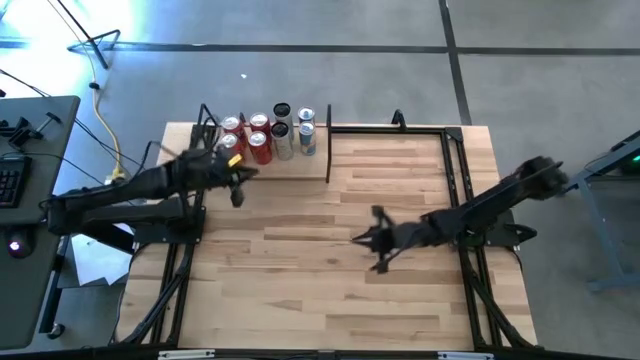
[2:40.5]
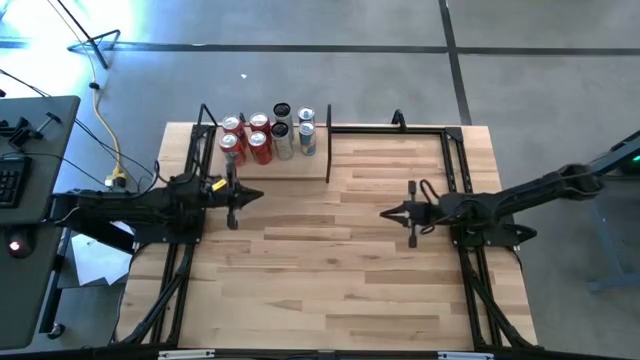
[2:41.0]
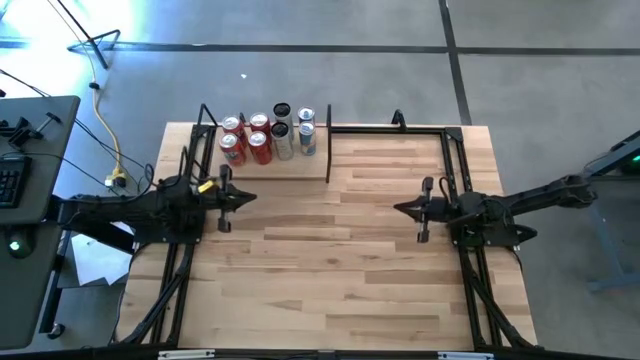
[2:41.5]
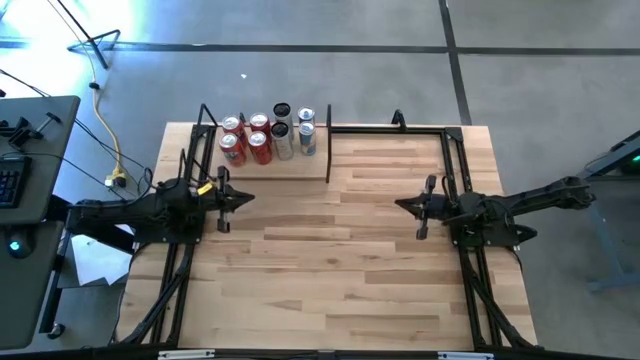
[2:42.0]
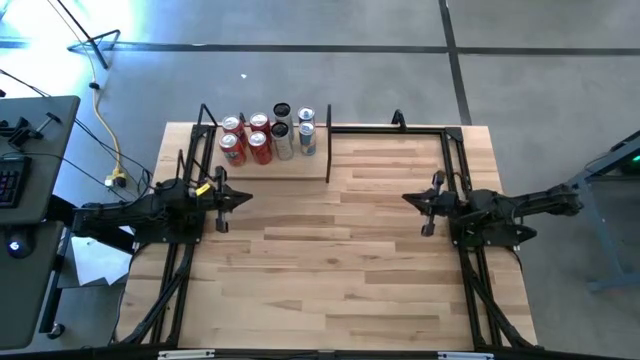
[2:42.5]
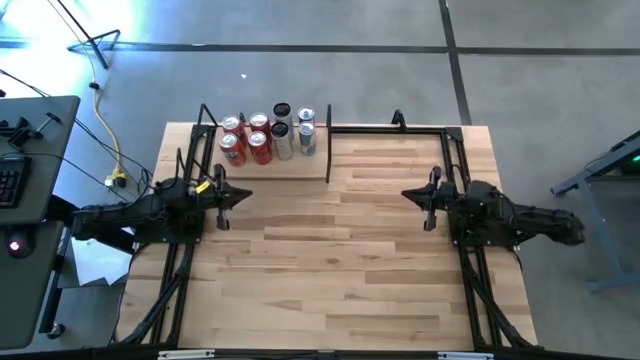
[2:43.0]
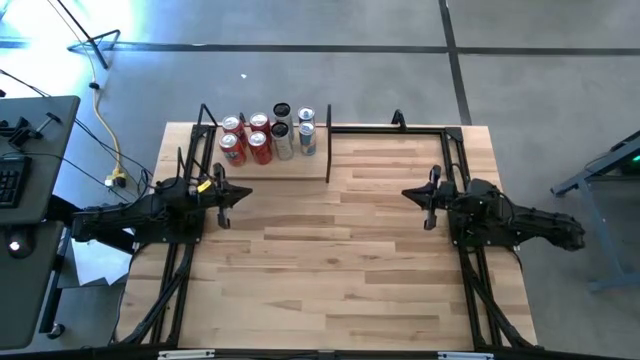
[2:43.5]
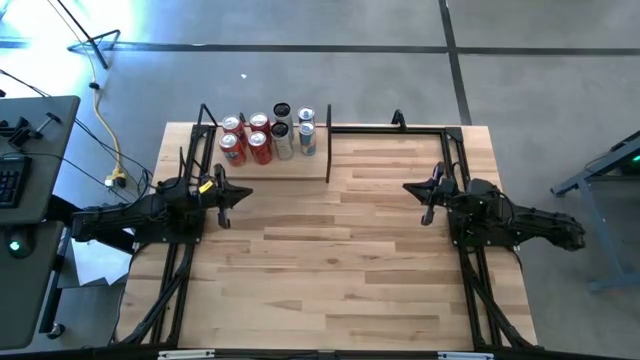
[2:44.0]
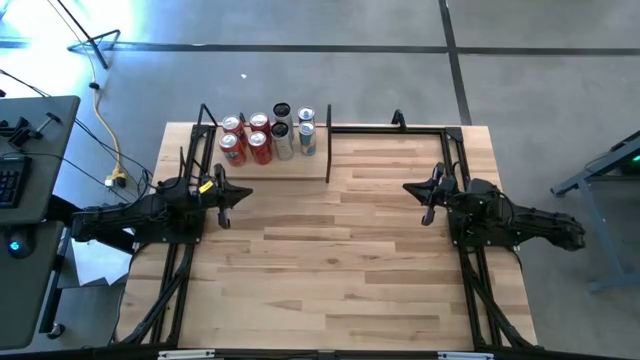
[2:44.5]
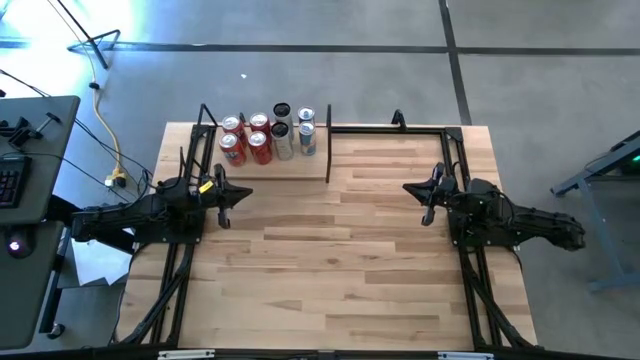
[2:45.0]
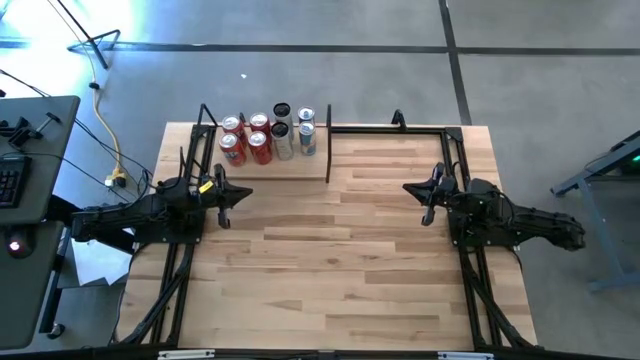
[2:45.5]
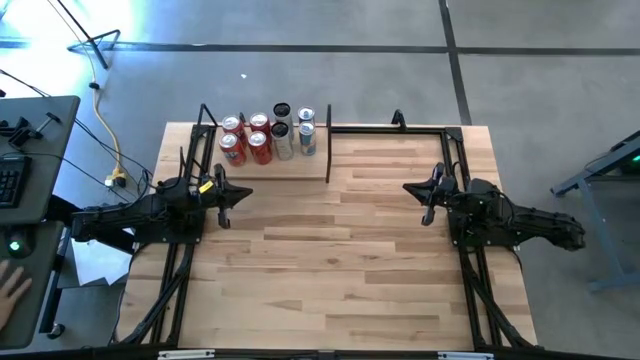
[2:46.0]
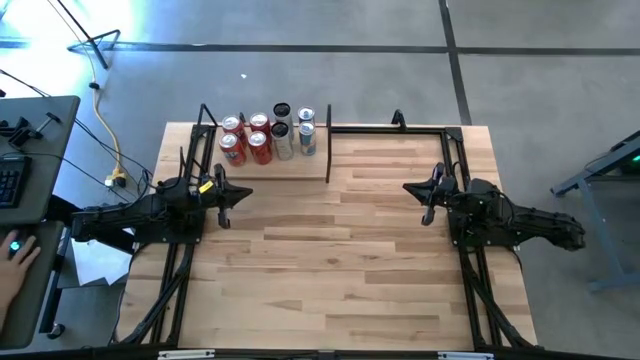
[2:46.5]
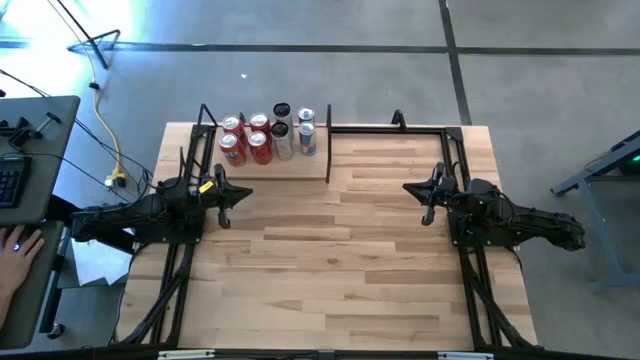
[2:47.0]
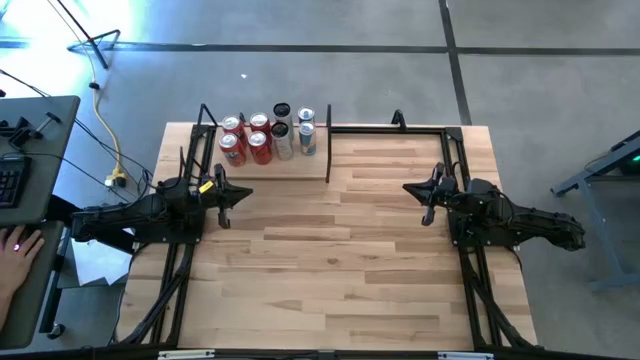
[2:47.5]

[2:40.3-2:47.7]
Task: Place canned beverage on shelf
Return to Home Position

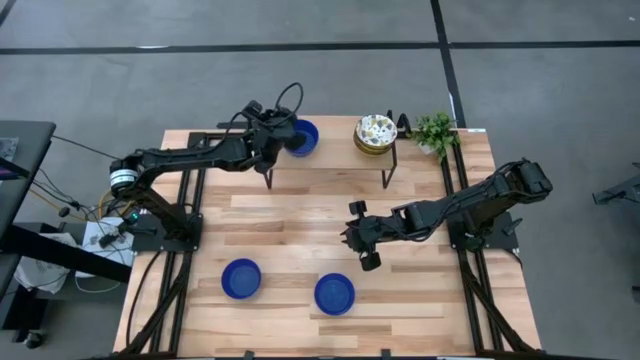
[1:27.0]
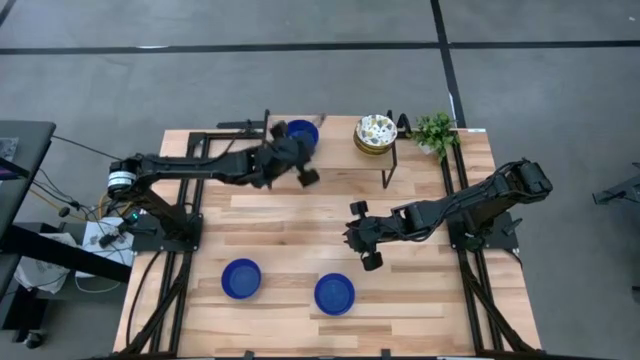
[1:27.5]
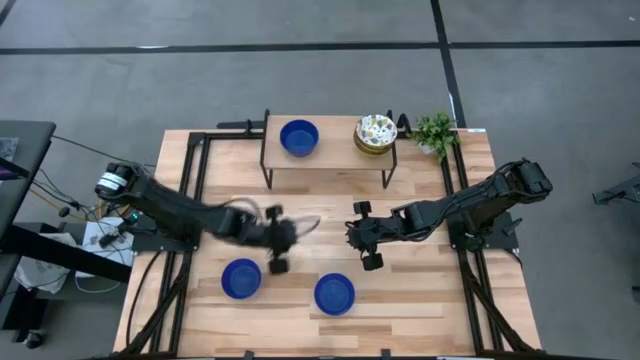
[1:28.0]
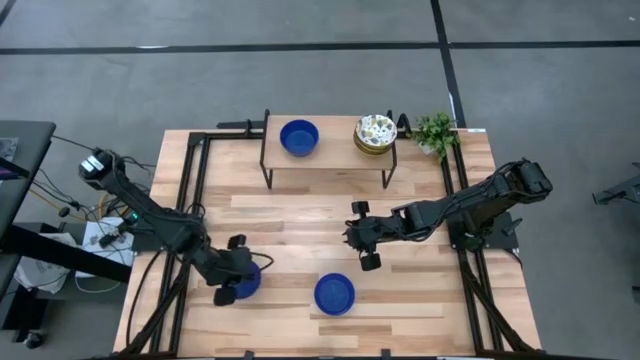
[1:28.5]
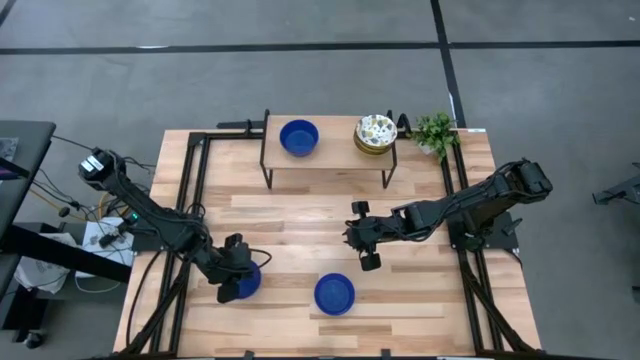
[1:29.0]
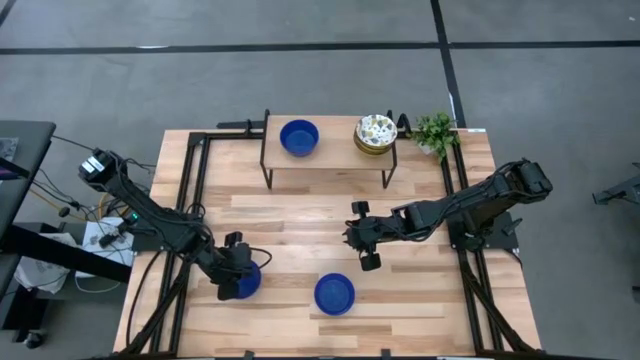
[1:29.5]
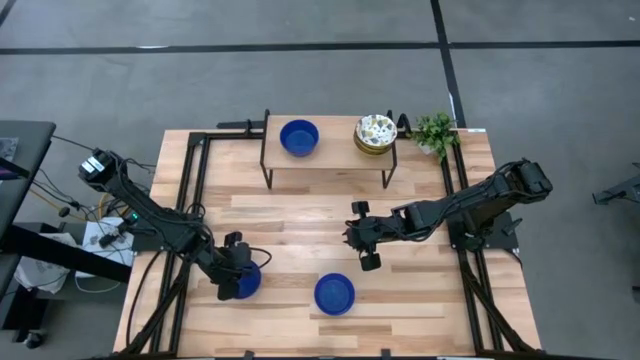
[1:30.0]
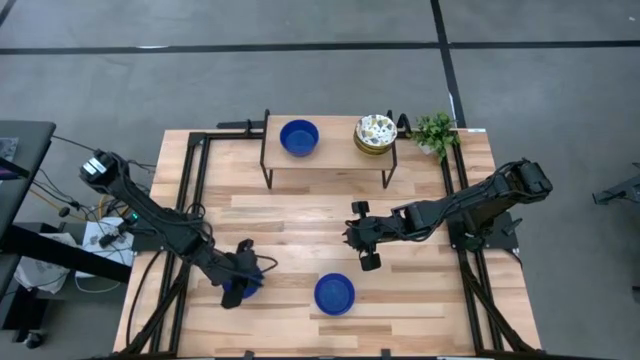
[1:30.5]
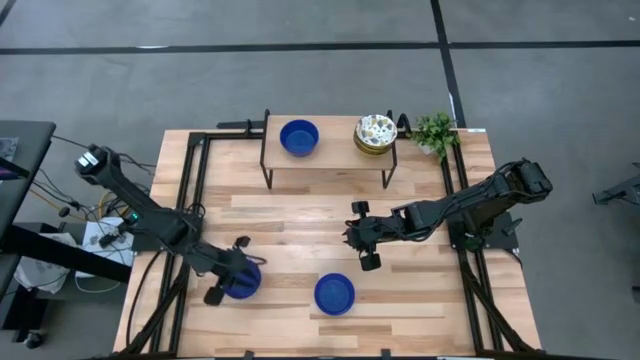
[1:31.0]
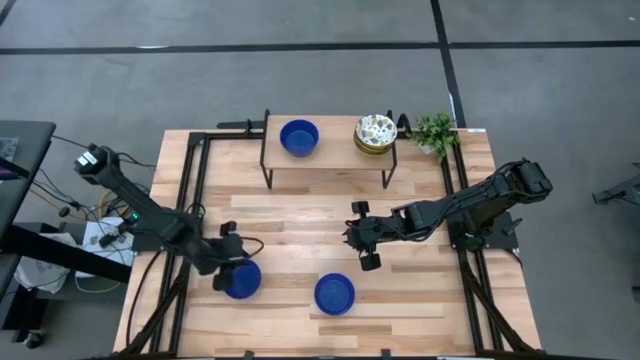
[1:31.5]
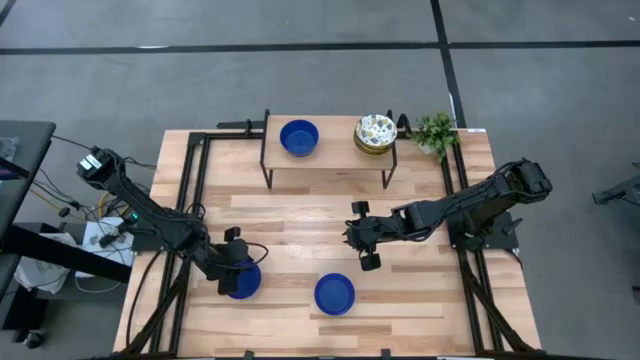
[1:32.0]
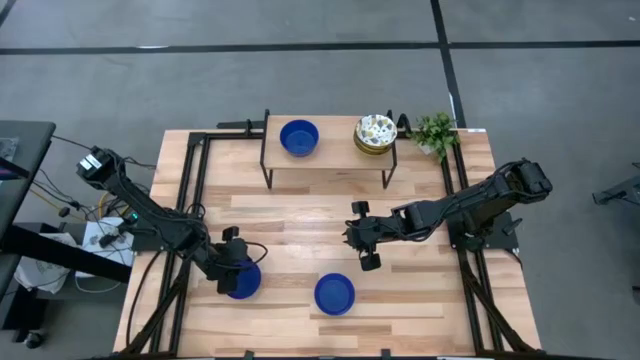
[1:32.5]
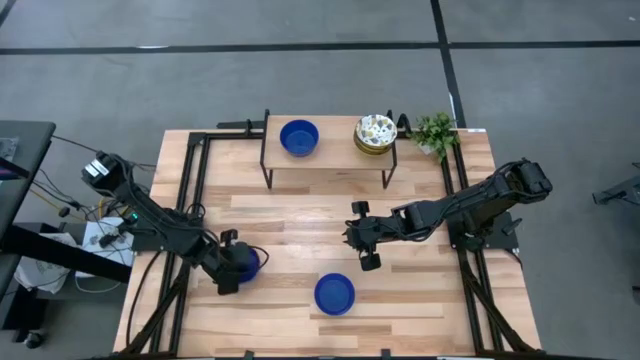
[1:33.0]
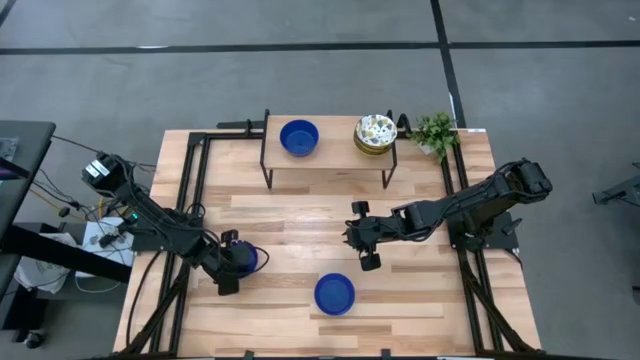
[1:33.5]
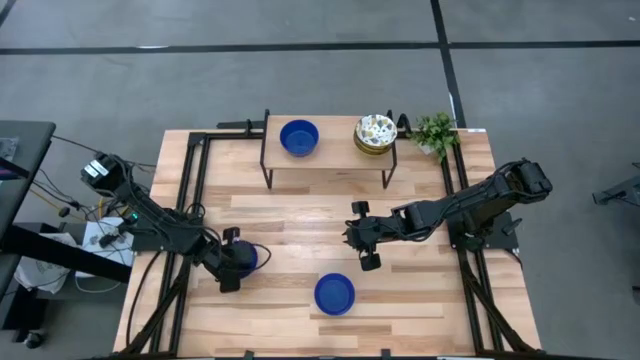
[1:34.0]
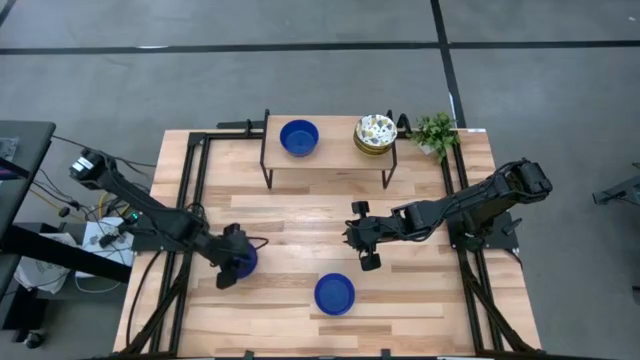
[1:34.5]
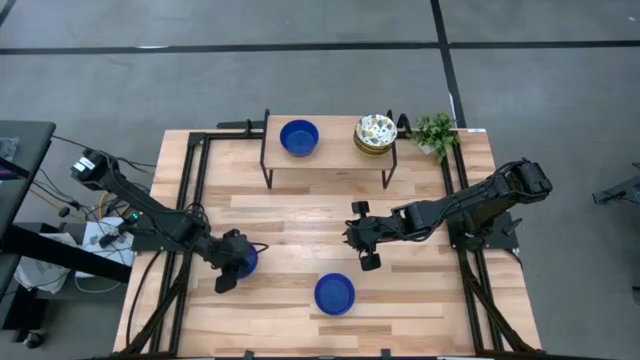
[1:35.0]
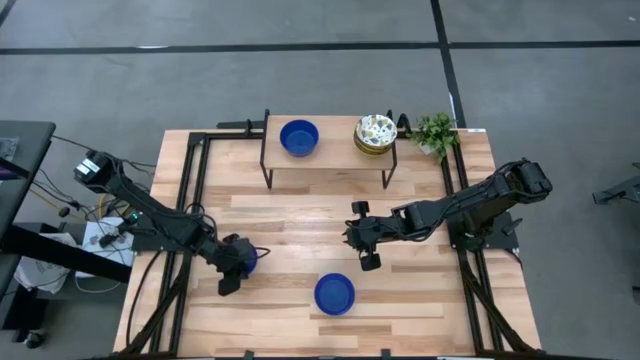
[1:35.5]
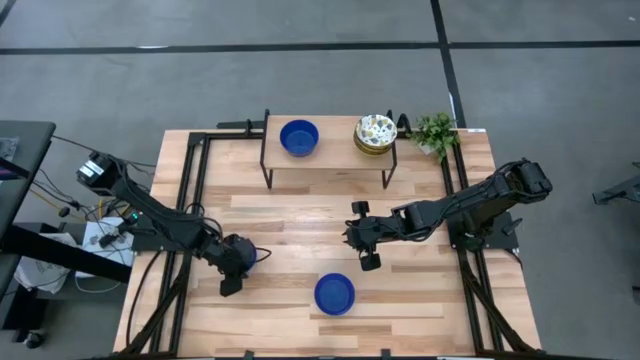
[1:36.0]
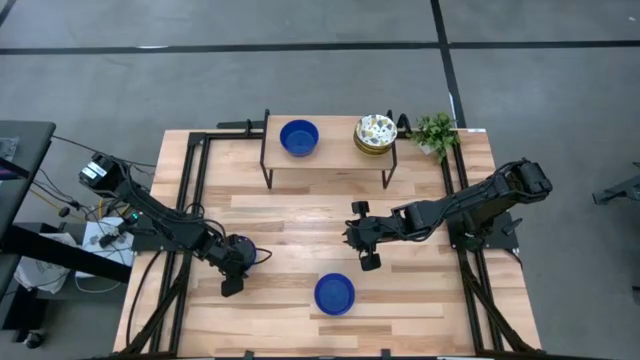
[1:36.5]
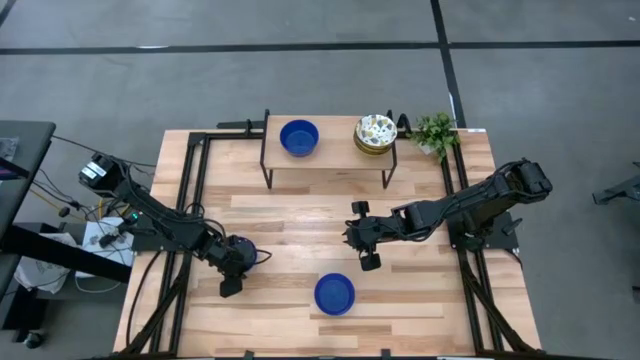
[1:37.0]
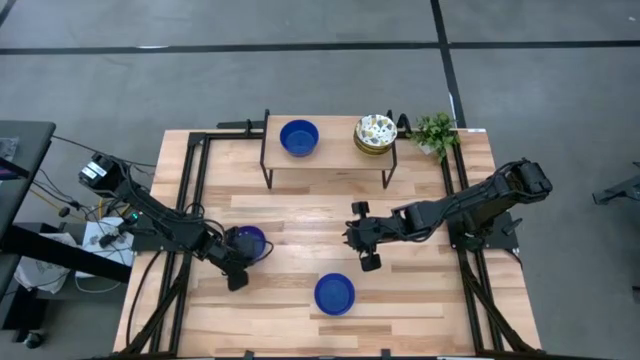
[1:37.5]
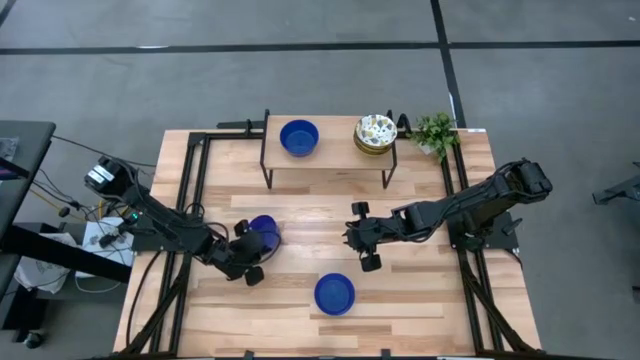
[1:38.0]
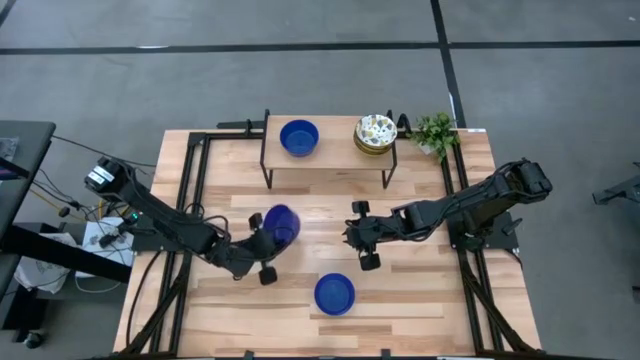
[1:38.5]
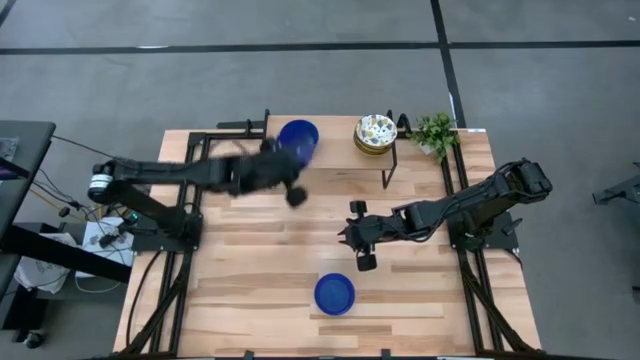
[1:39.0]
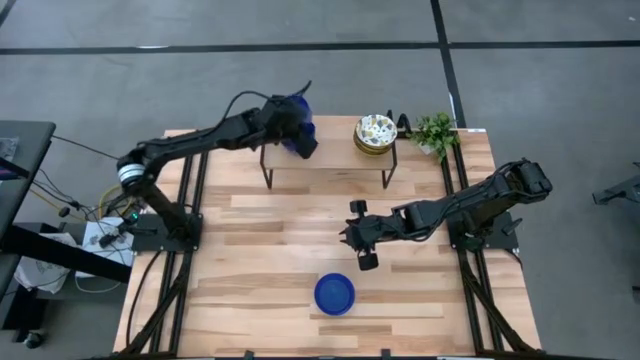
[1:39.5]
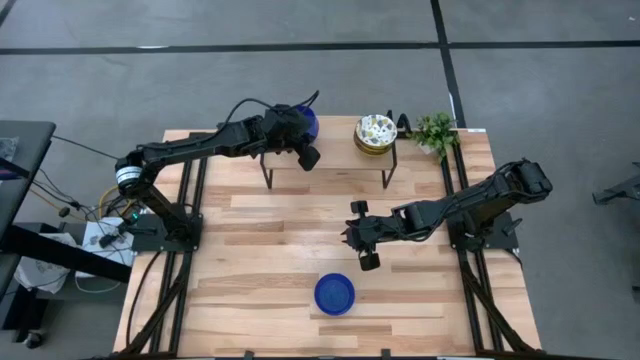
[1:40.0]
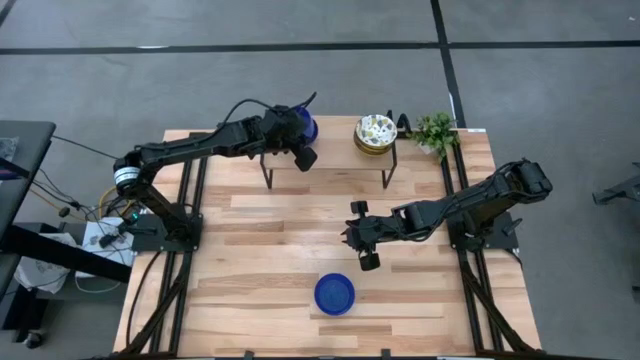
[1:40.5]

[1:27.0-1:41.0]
Task: Pick & Place Mini bowls
Stack the blue bowl on the blue bowl on the shelf
